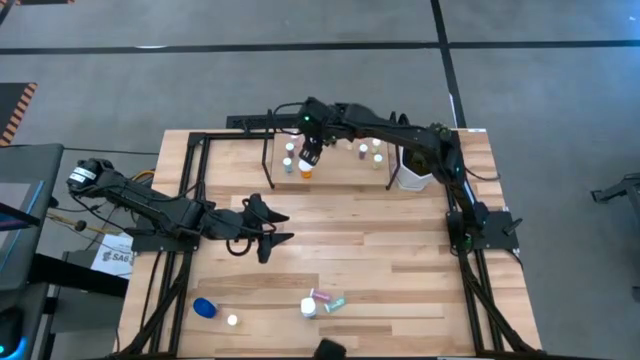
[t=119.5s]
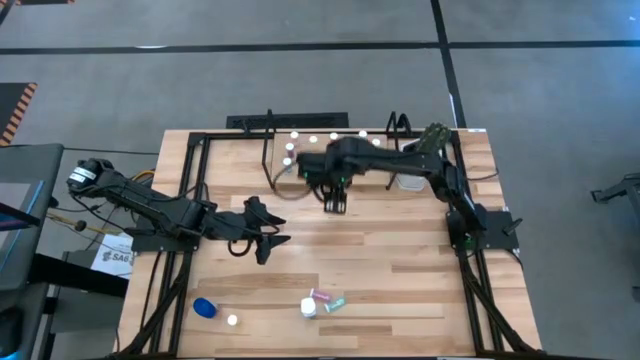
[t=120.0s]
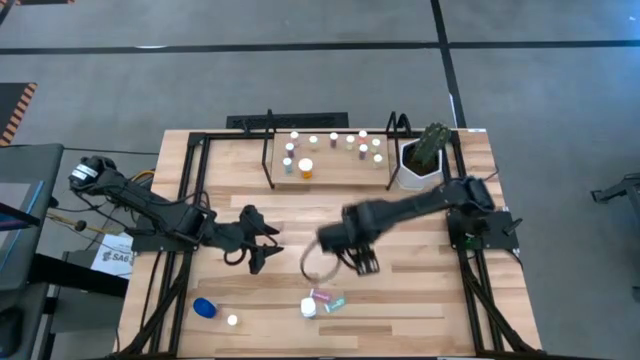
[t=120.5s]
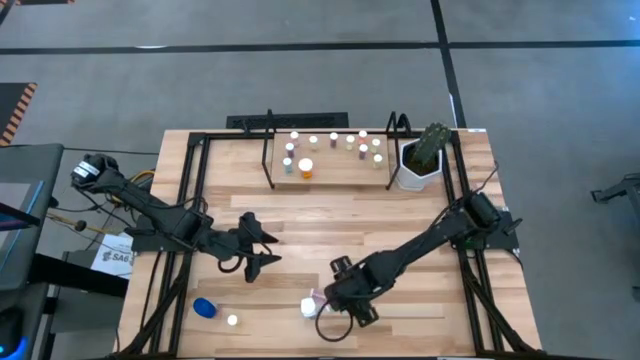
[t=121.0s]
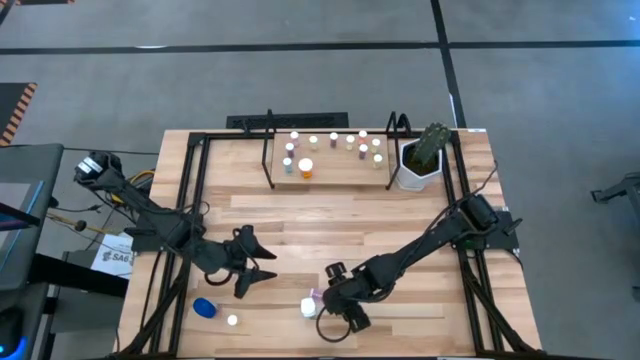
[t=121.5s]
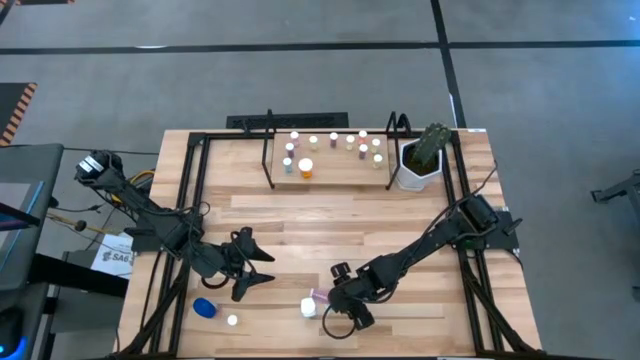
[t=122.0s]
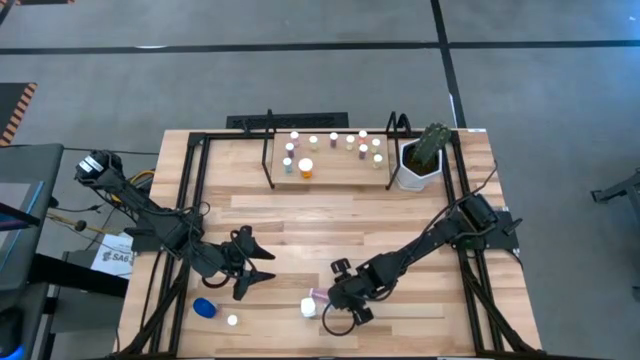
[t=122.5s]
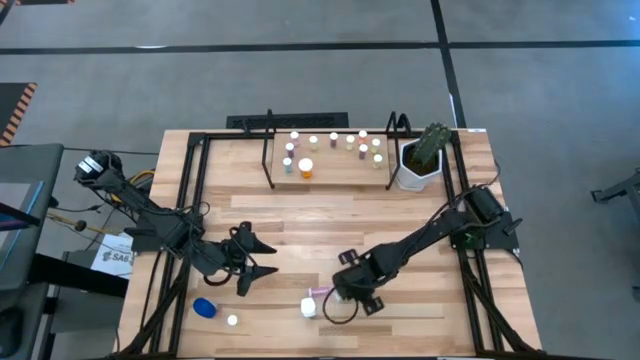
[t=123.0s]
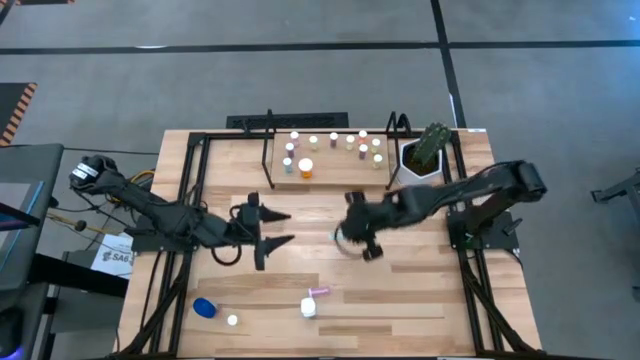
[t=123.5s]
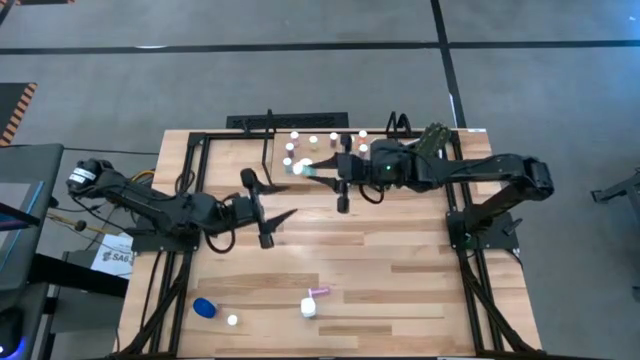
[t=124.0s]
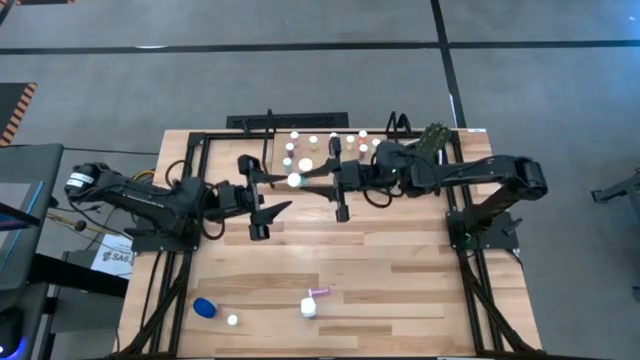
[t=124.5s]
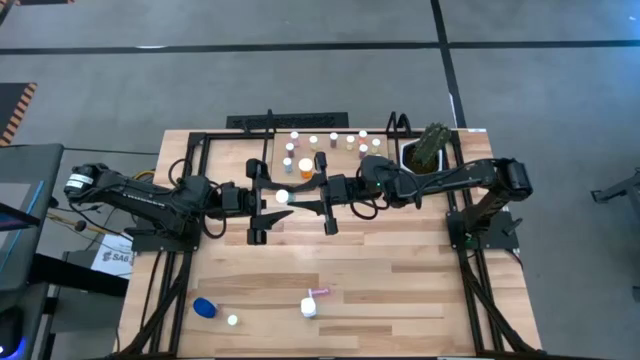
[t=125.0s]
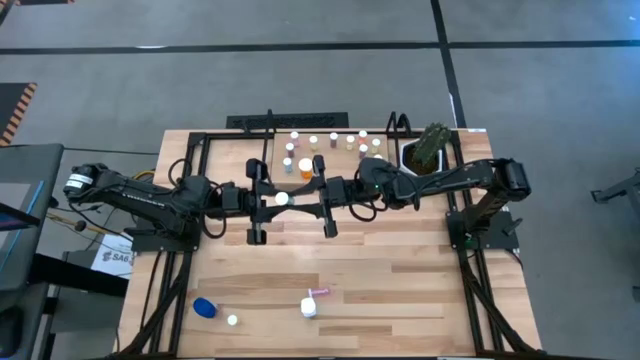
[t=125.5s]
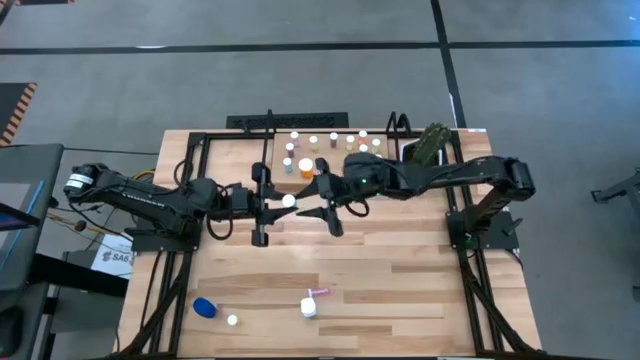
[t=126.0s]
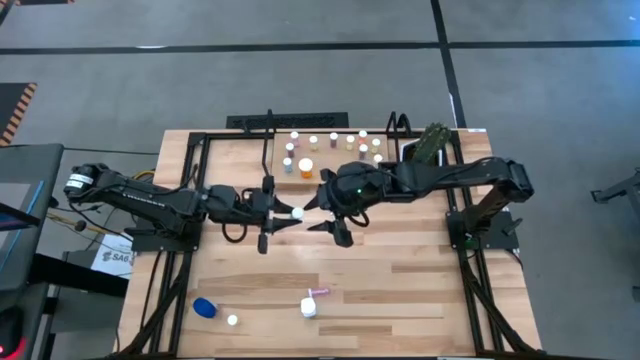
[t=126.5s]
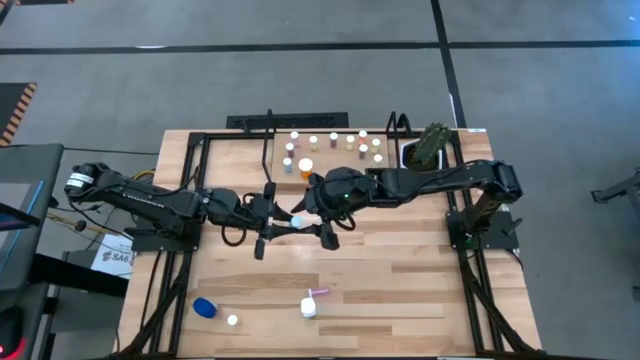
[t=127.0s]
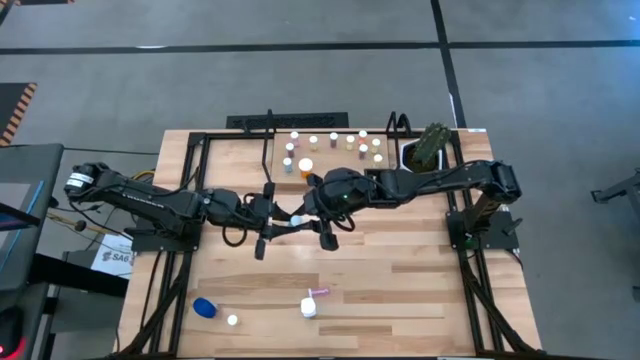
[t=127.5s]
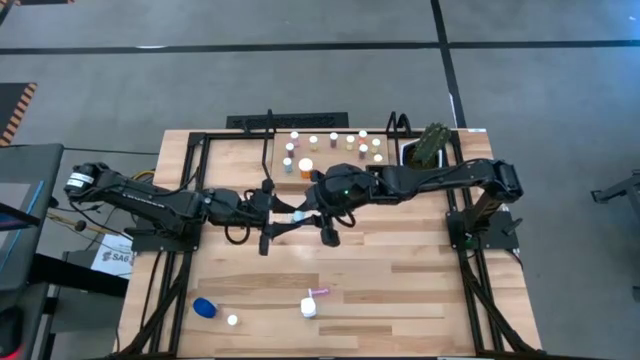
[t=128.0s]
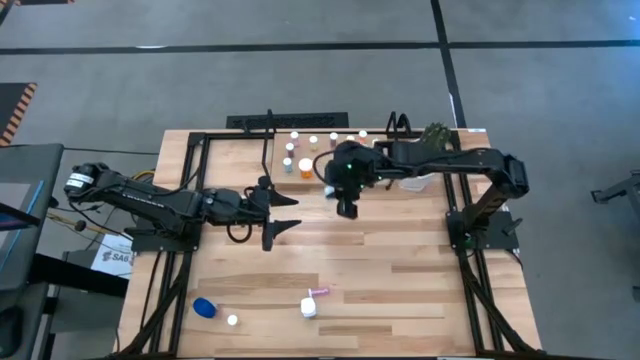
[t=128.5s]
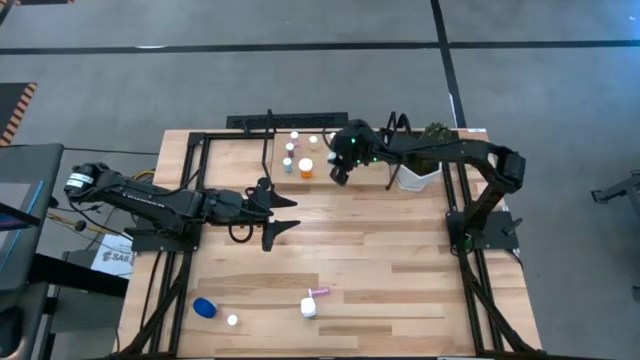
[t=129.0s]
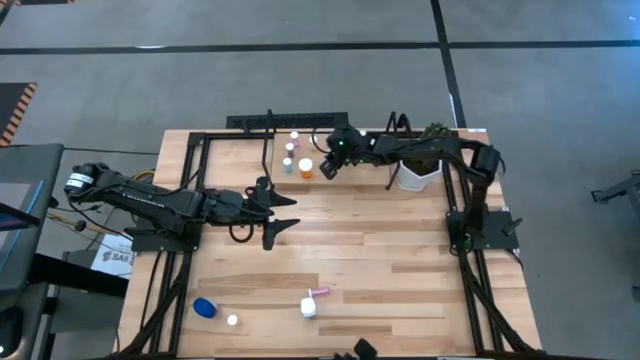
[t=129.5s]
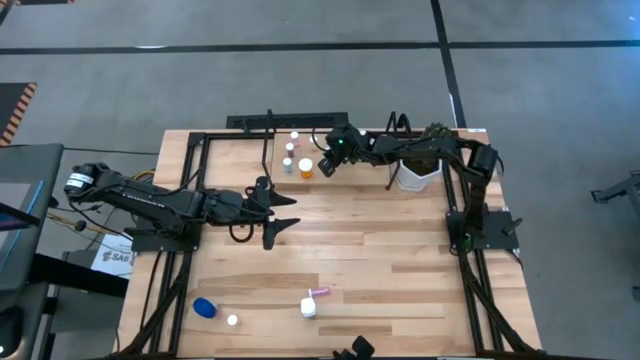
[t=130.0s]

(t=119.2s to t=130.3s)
Task: Pick and place medicine bottles onto shelf by color
Put the blue pill bottle on the shelf

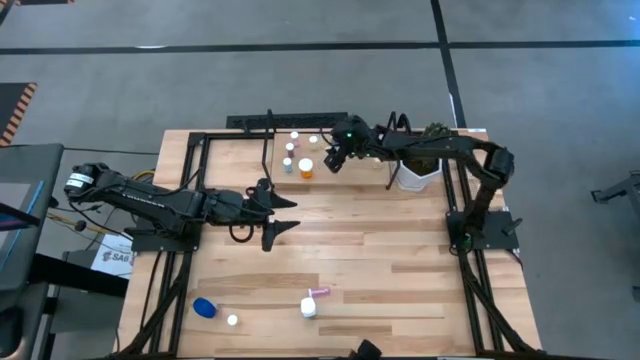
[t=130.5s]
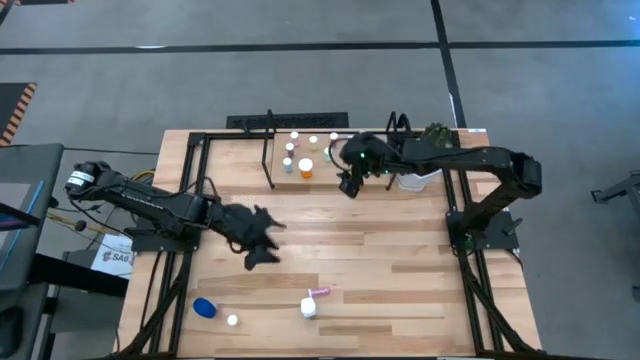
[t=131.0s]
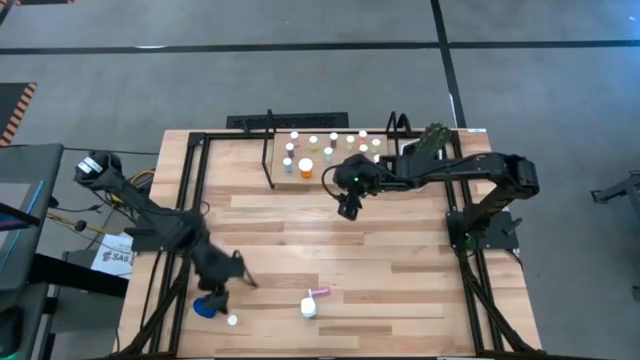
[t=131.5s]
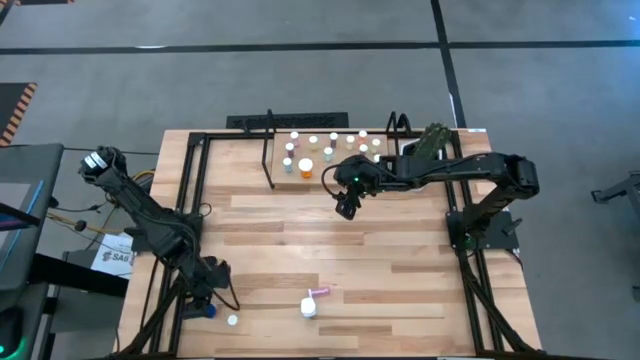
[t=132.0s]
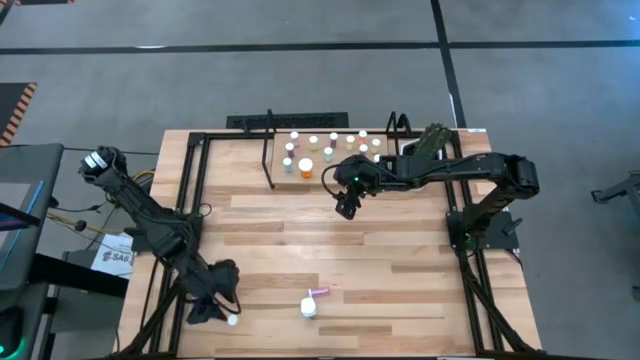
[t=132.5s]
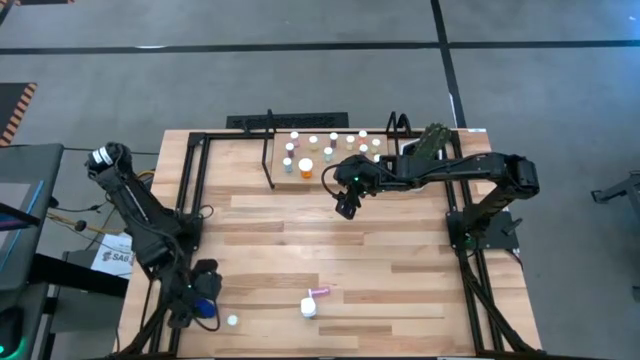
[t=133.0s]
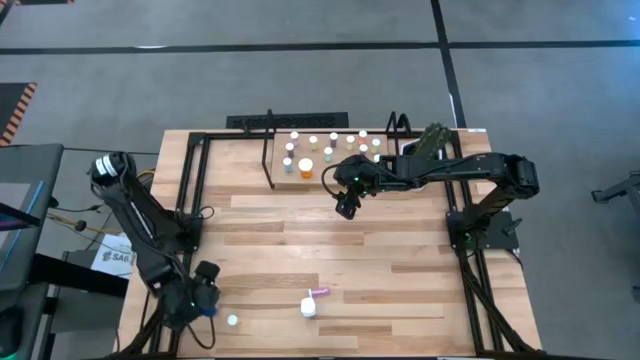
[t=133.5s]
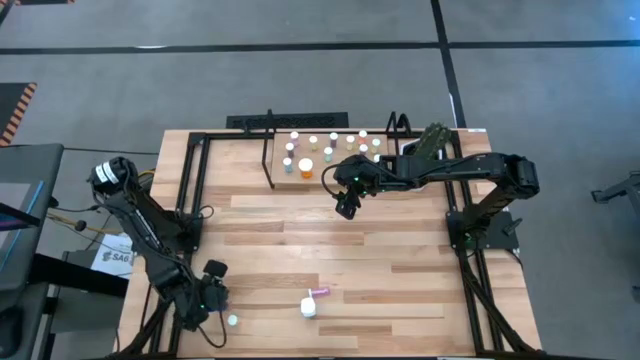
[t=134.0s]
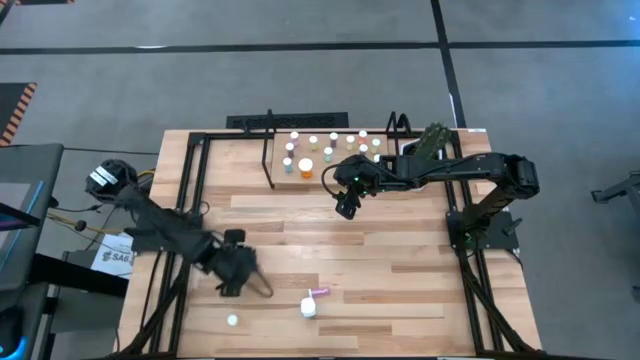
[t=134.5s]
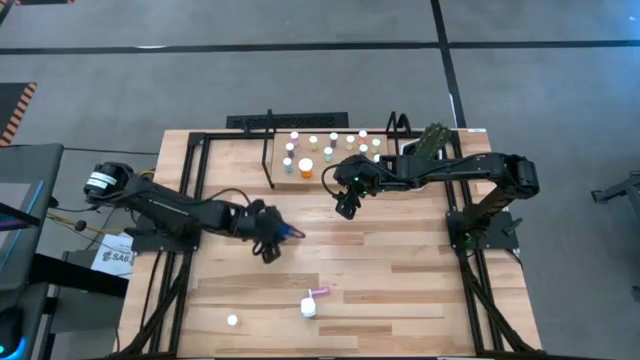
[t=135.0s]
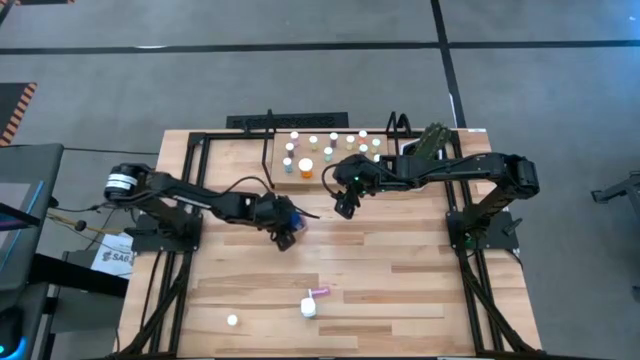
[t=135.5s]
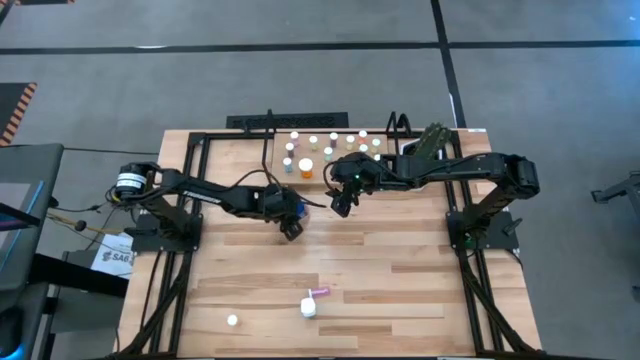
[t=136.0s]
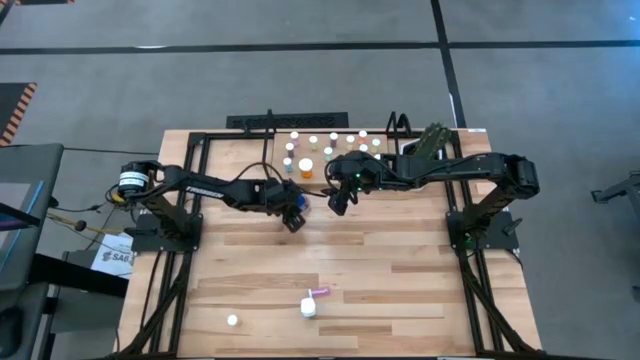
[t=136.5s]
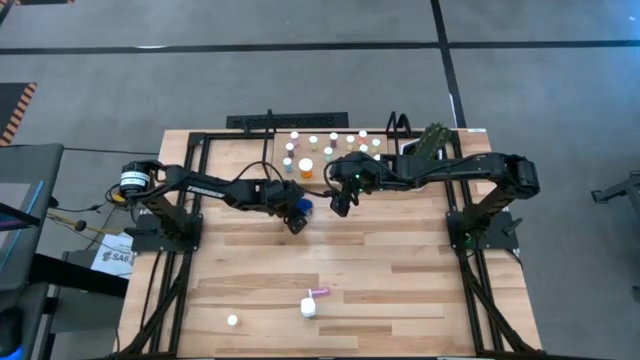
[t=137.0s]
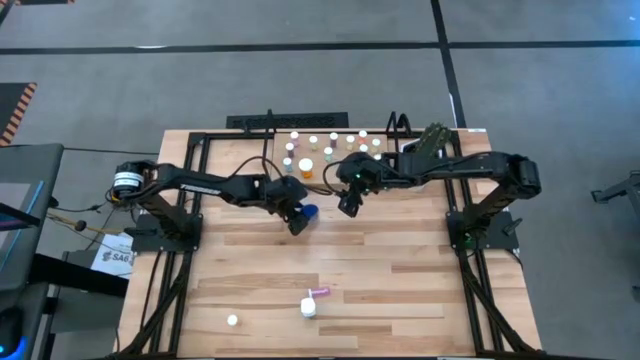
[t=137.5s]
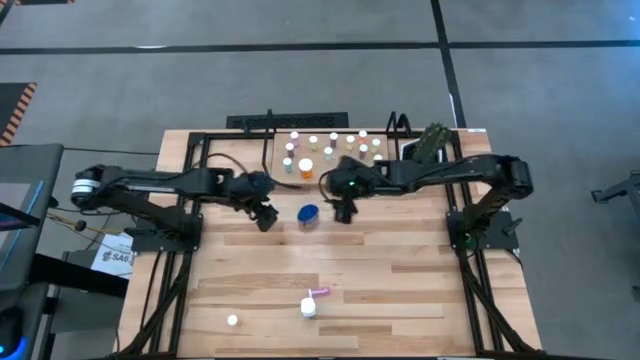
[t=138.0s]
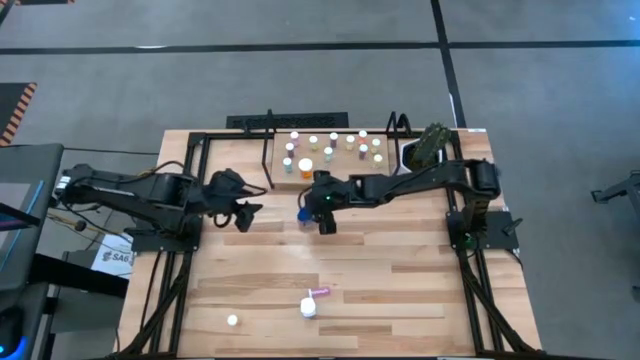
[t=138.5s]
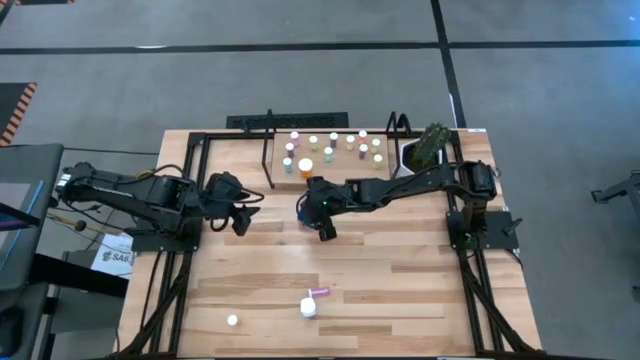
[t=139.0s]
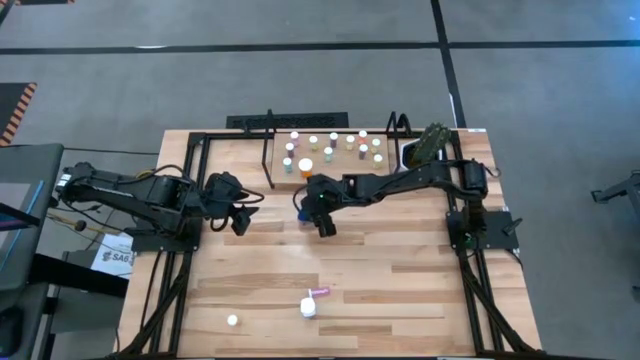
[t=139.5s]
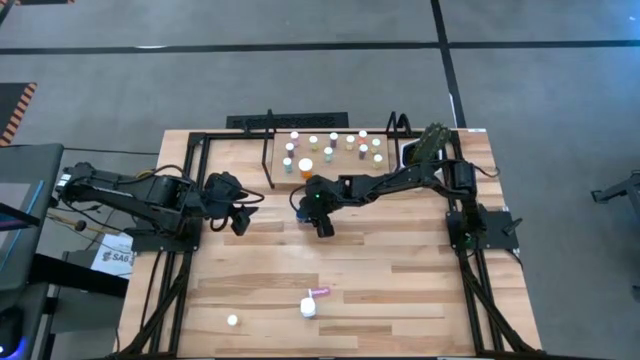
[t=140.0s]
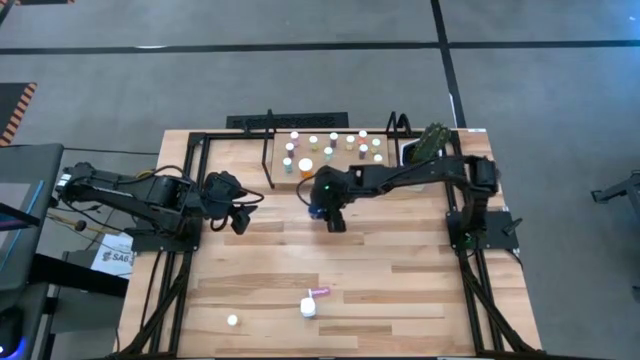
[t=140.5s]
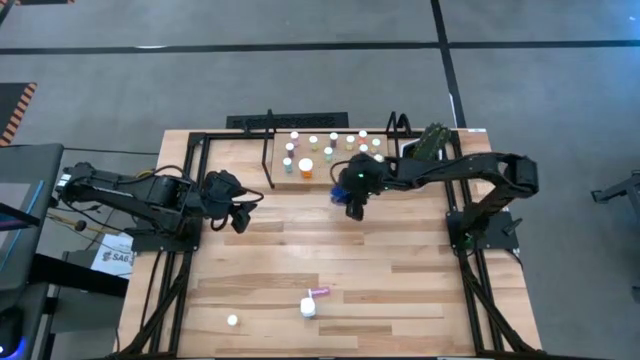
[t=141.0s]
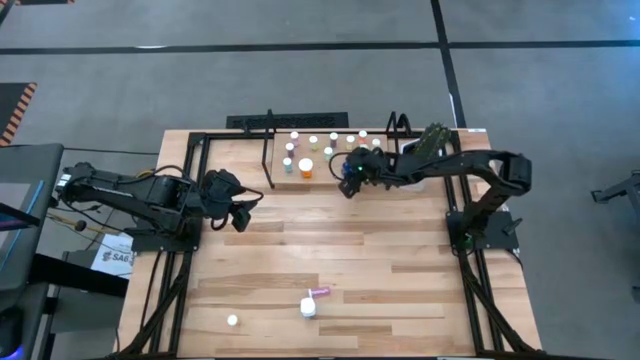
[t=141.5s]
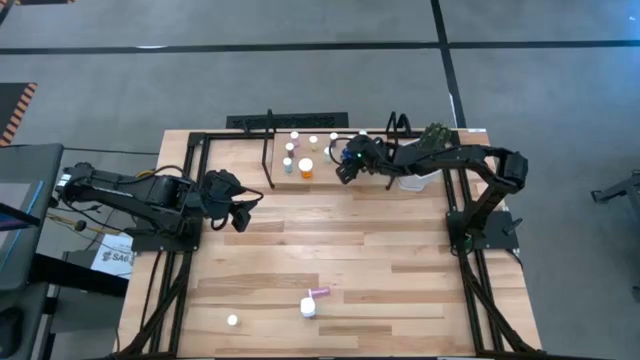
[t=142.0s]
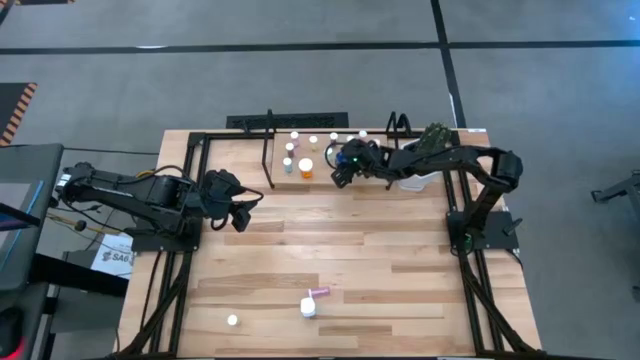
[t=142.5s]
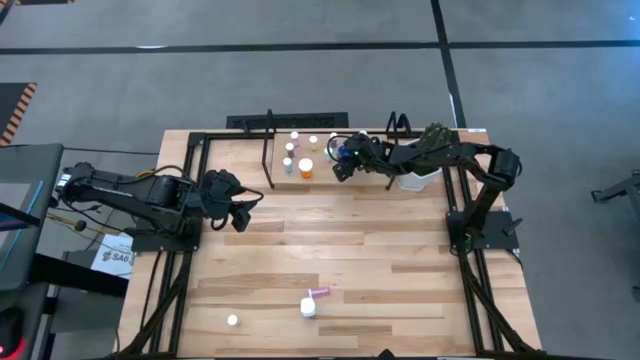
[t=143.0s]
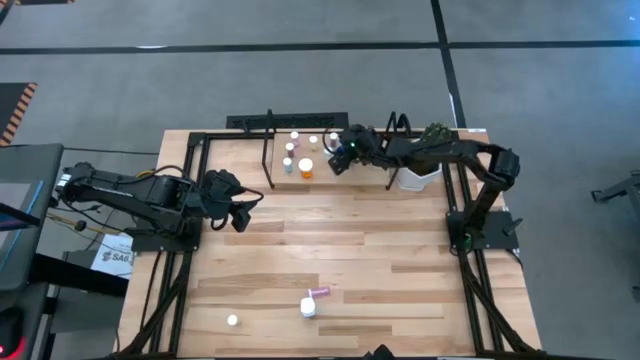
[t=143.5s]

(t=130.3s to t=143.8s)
Put the blue gummy pill bottle on the shelf
